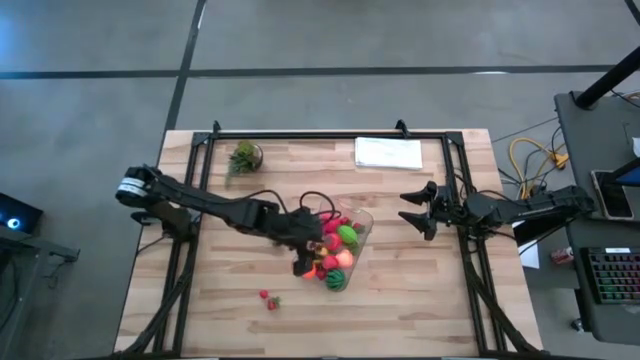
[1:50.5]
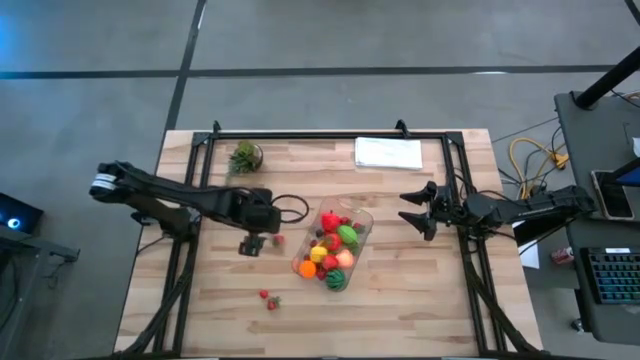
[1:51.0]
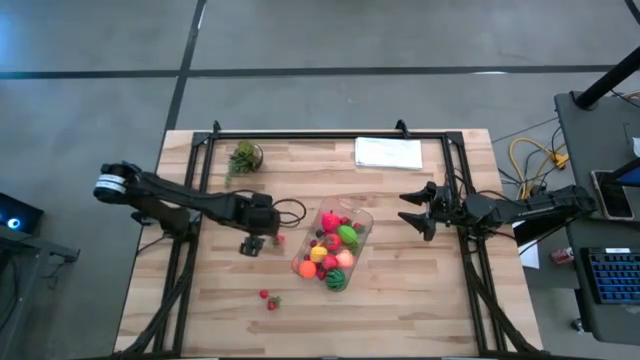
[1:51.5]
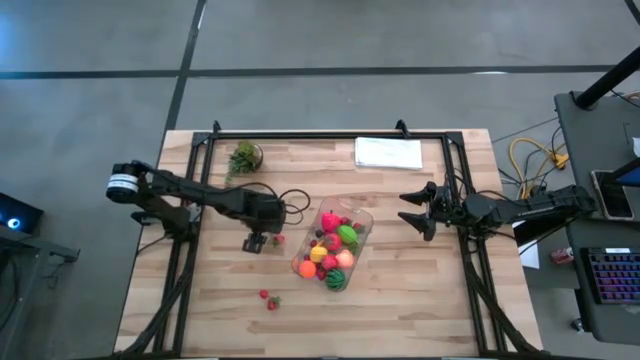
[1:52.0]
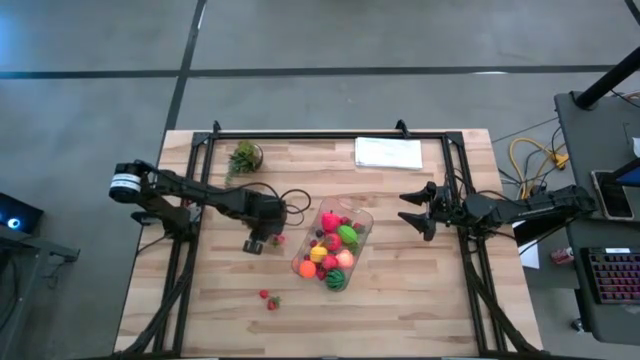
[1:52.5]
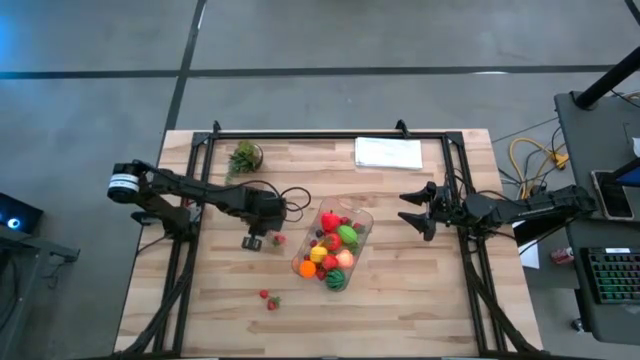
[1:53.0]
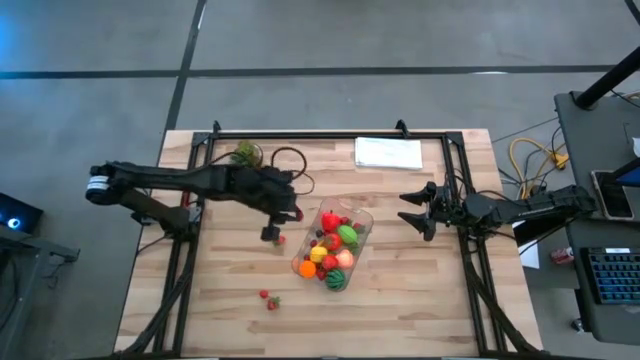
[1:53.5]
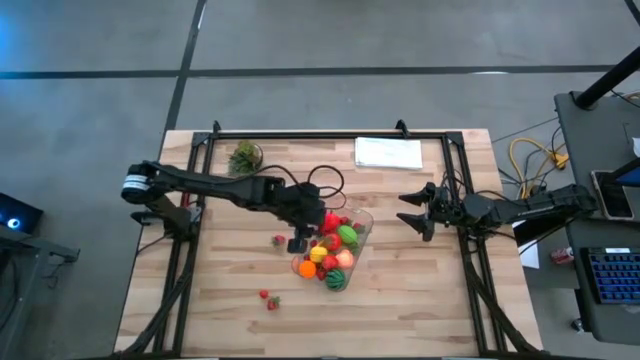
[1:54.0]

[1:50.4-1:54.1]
Task: Pick and placing Produce into tupperware
Put the red cherry into the transparent bin

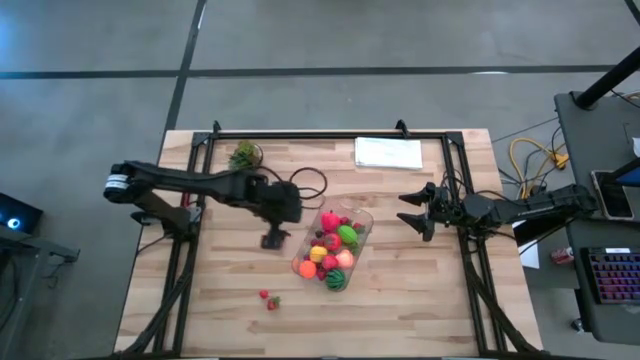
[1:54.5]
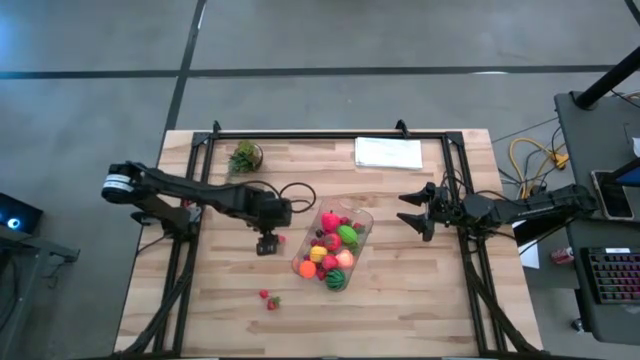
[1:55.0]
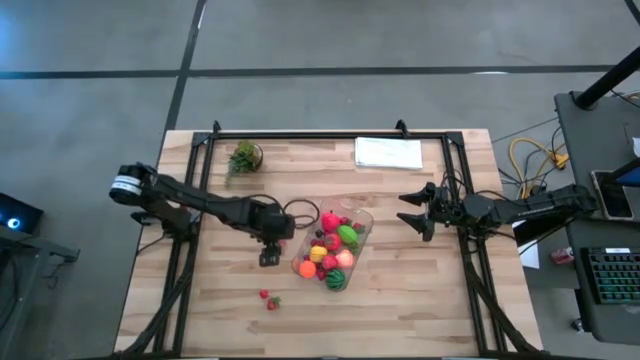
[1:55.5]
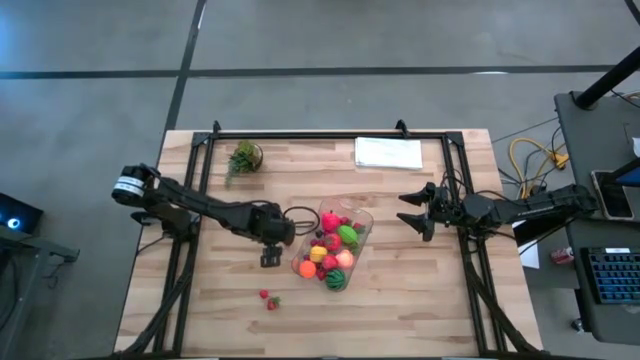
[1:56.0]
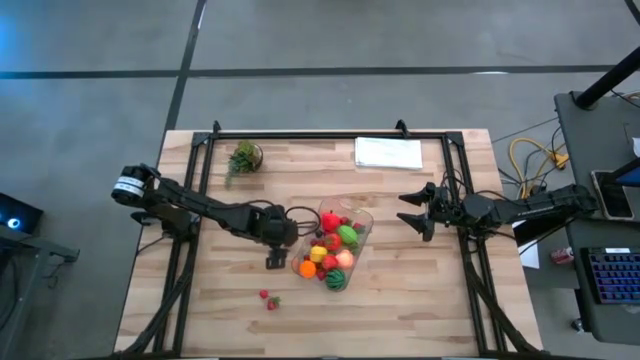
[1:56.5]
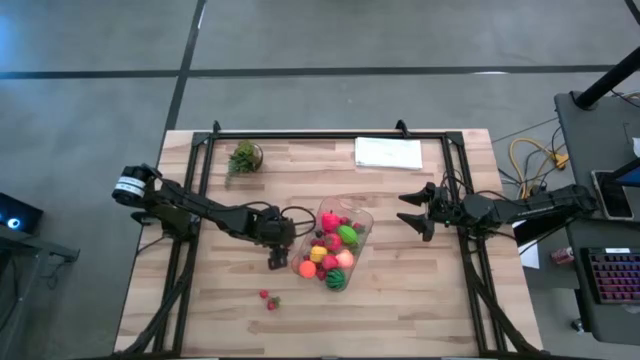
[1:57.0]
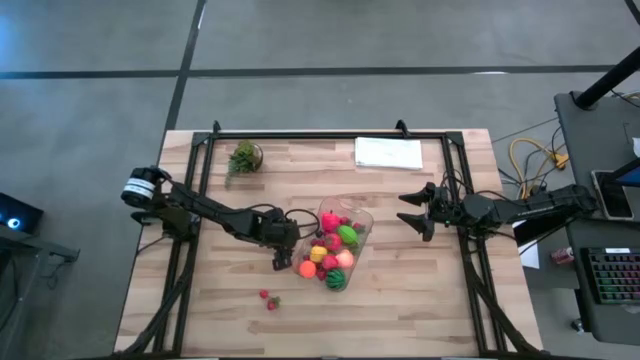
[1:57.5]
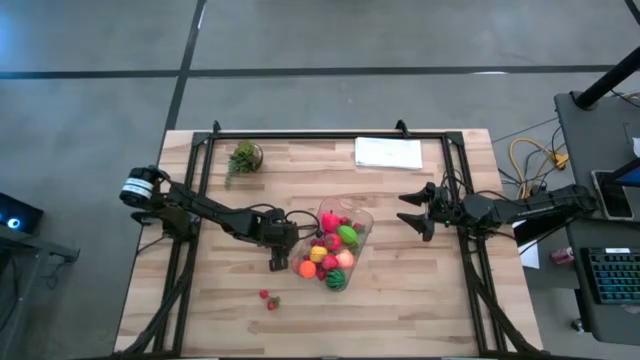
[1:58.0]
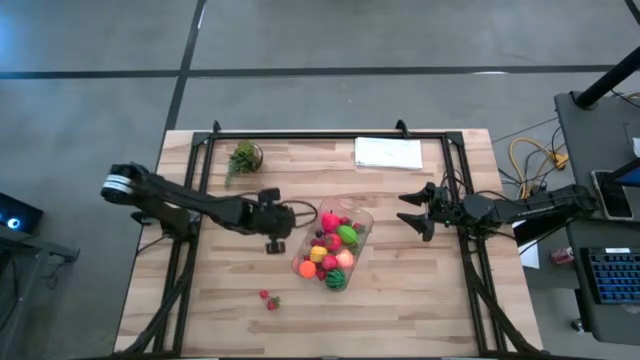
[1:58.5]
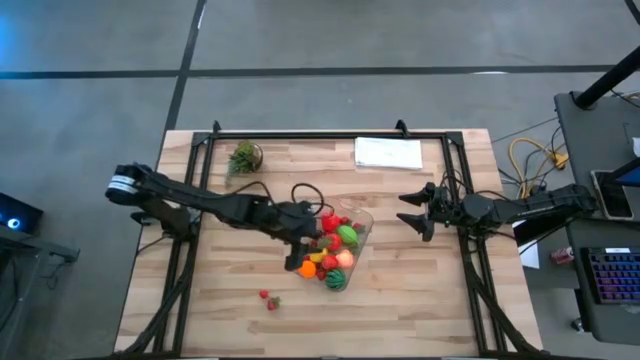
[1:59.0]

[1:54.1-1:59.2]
Put the red strawberry into the transparent bin

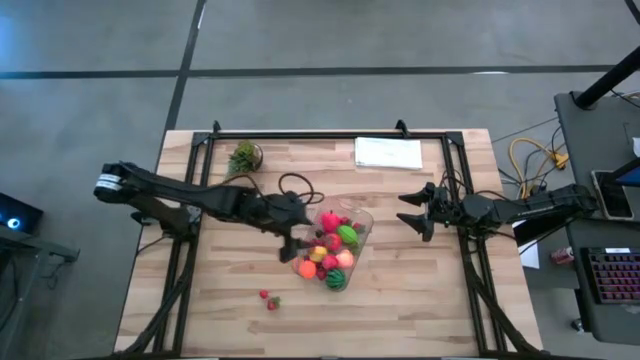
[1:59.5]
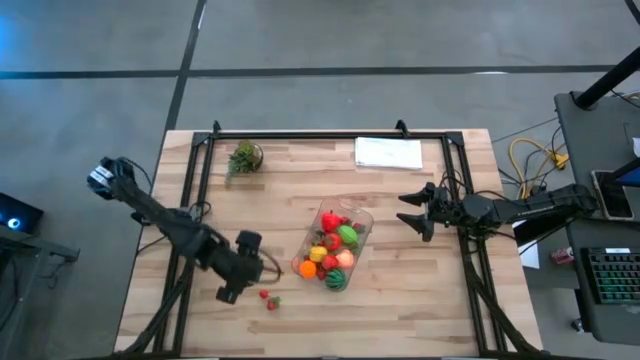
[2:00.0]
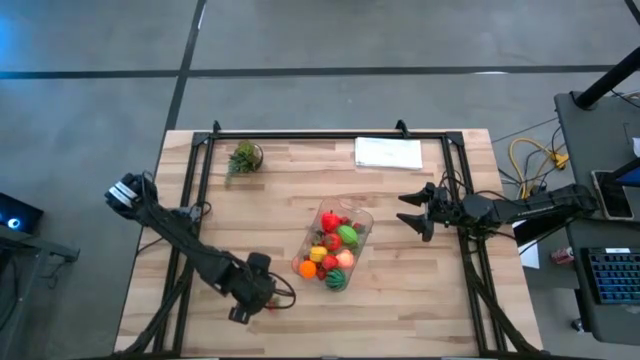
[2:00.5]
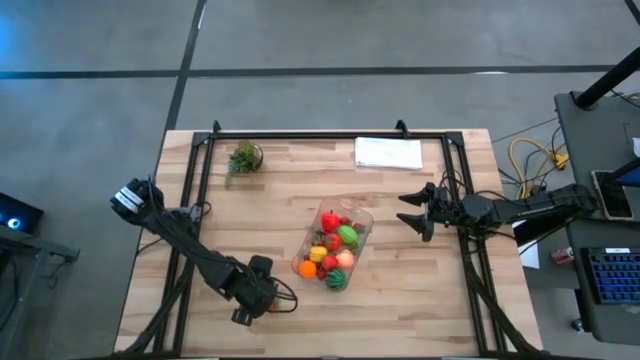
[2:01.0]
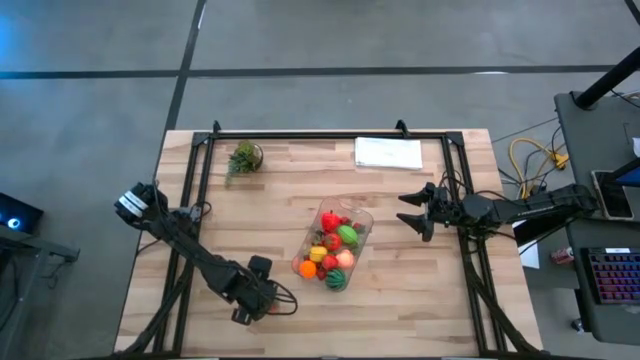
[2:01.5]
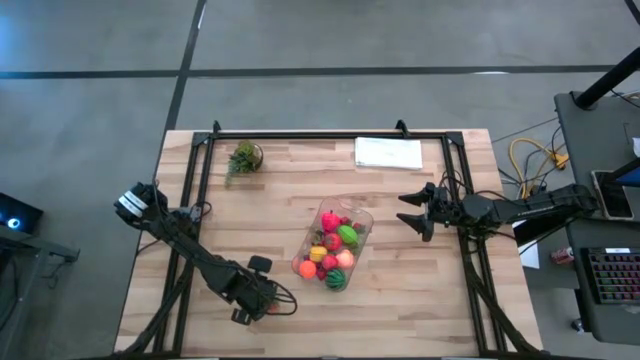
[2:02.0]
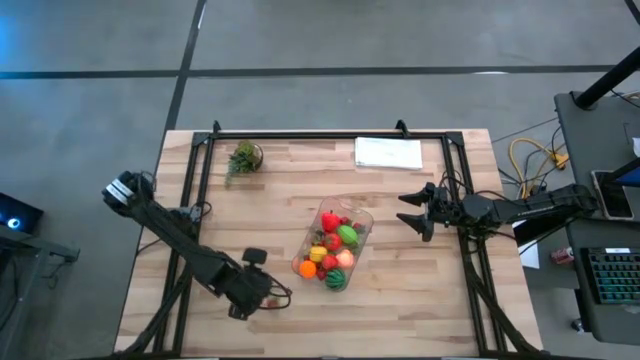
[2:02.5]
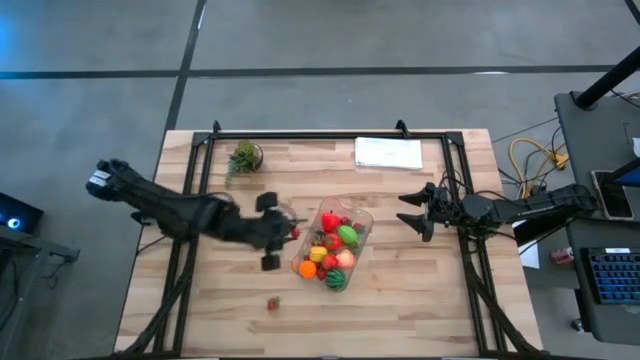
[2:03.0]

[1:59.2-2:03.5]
Put the red cherry into the transparent bin

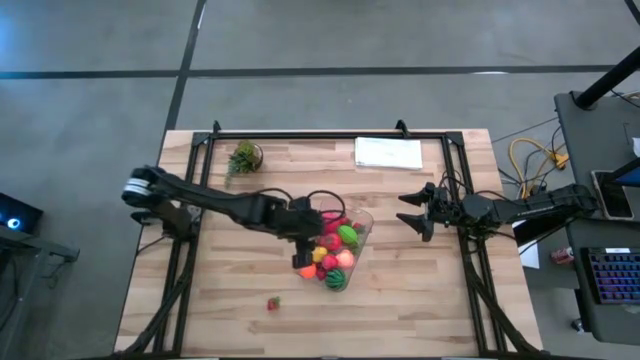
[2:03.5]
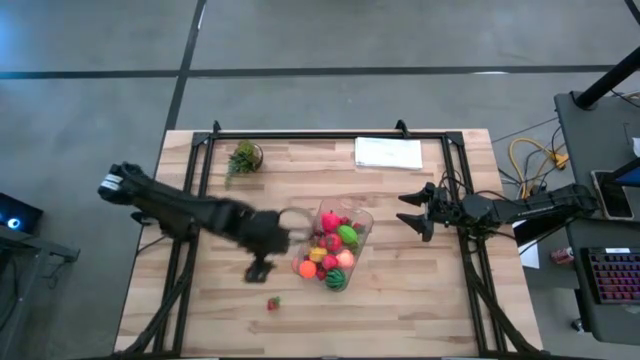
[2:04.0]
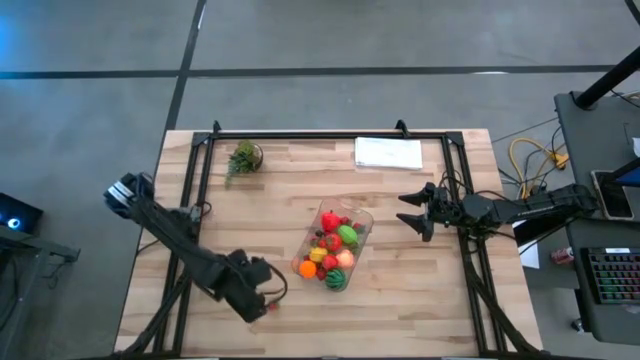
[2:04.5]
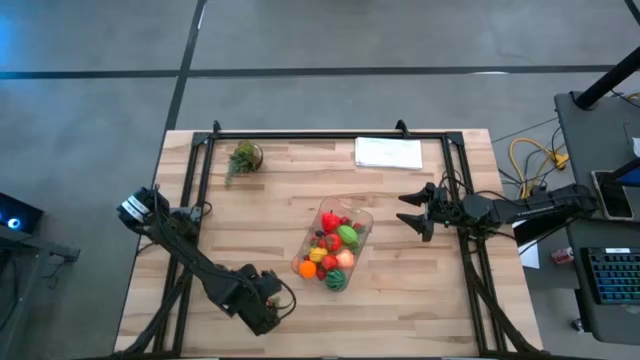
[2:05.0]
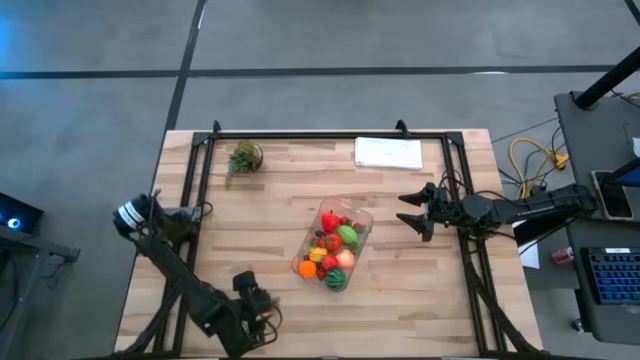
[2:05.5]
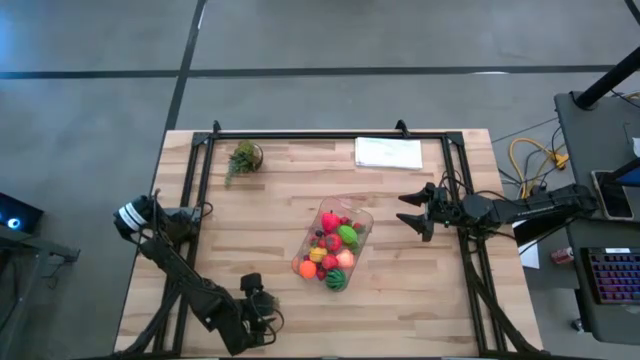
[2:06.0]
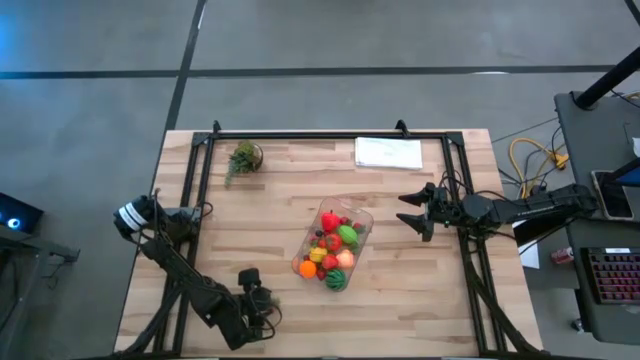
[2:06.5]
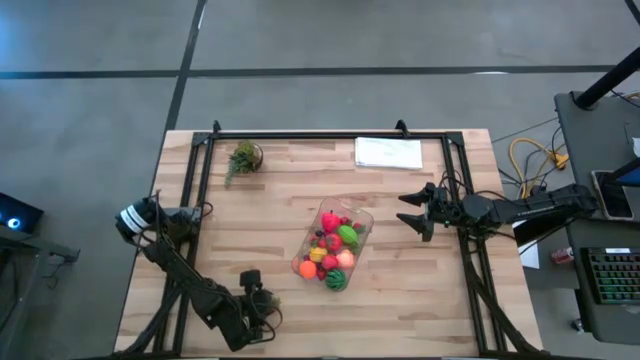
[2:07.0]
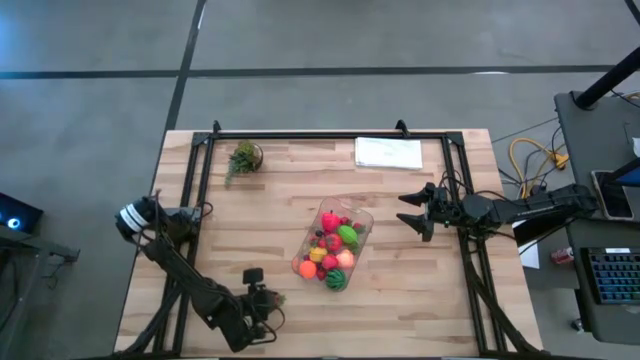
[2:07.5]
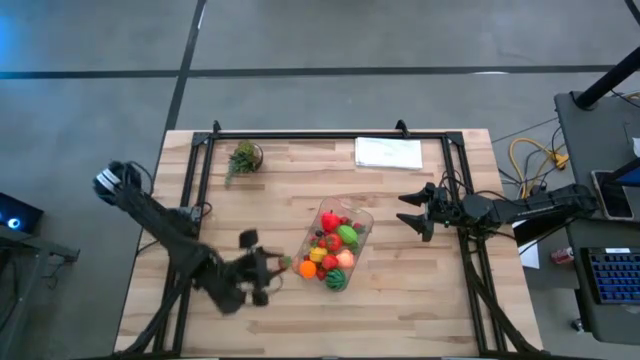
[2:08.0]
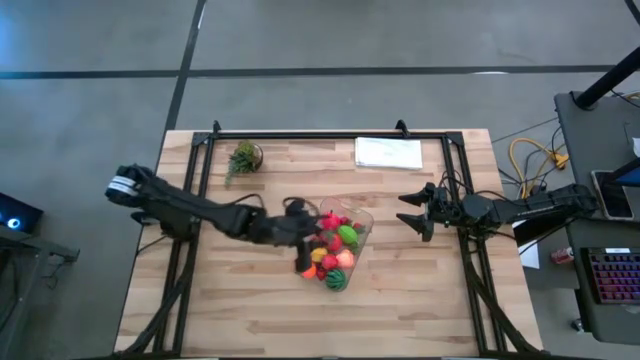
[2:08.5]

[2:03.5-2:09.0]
Put the red strawberry into the transparent bin

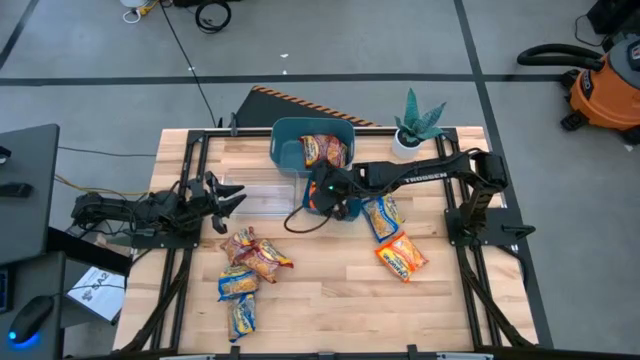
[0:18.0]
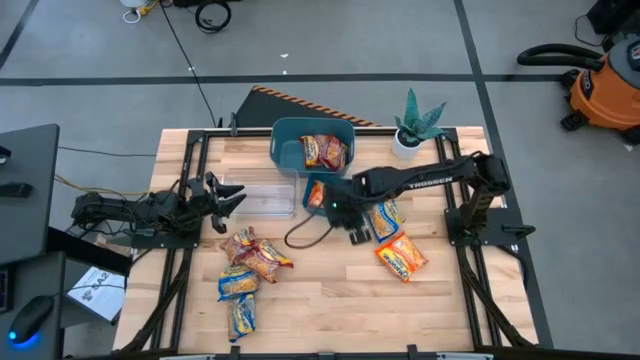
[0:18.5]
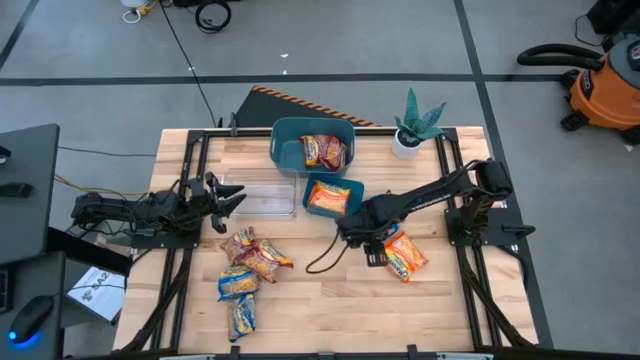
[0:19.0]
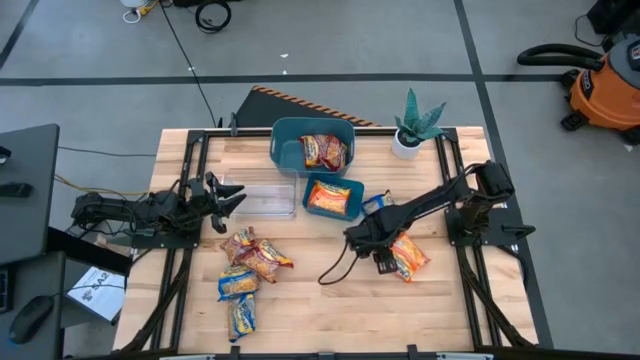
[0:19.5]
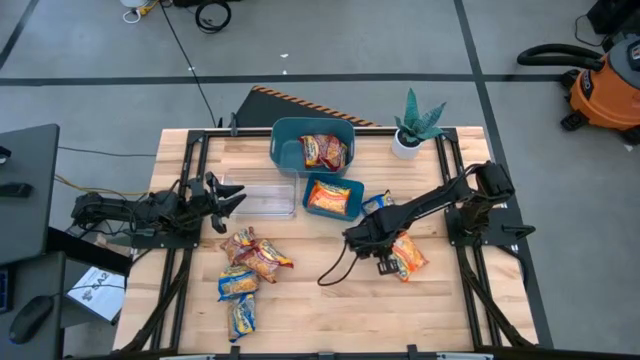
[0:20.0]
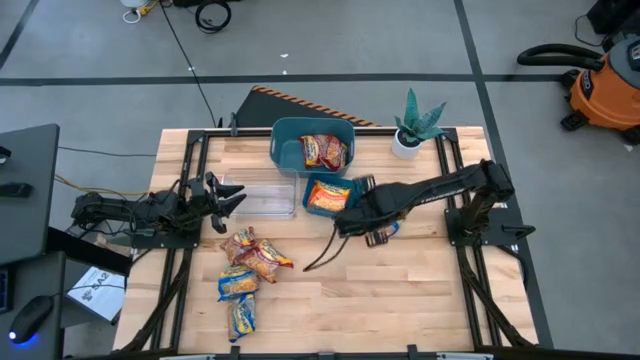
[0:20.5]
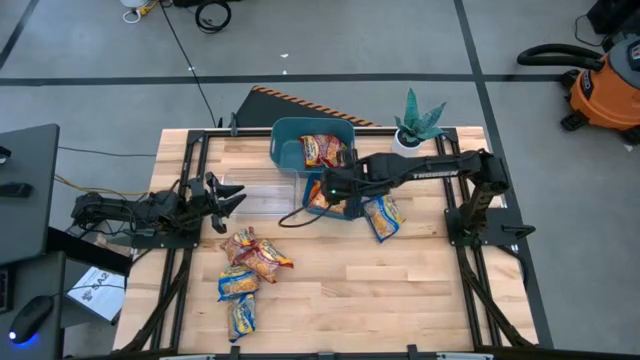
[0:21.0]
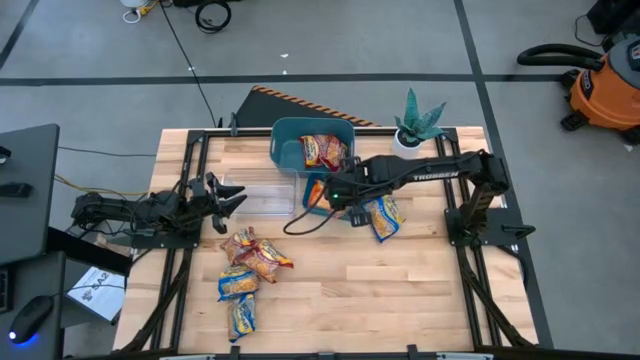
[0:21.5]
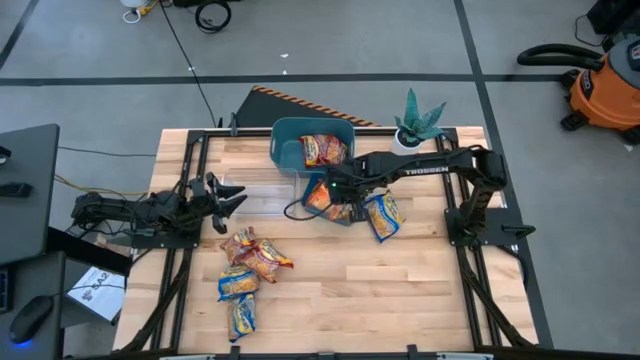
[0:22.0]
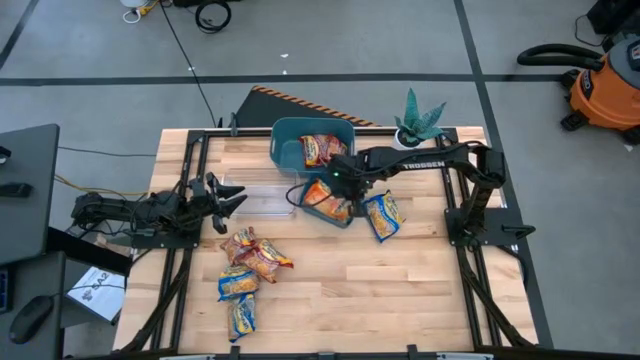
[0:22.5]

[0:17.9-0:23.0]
Task: Sort Maruchan noodles
Put the orange noodle pack into the blue bin
